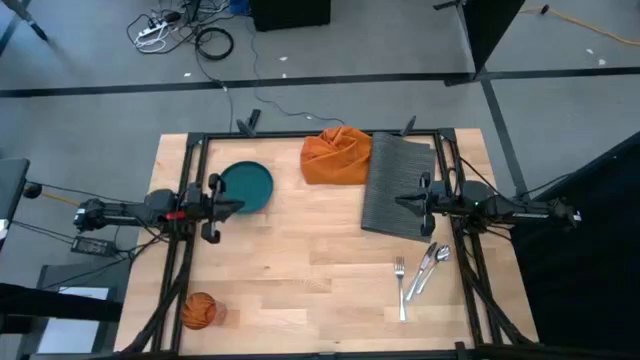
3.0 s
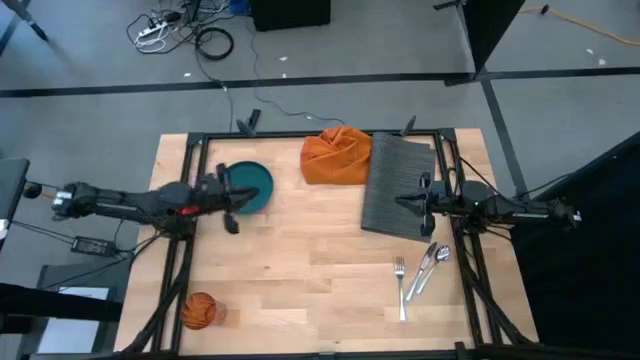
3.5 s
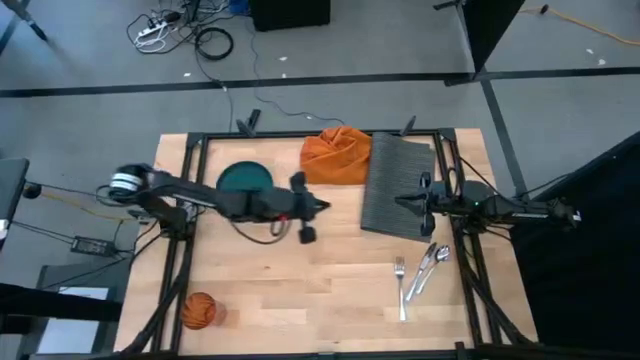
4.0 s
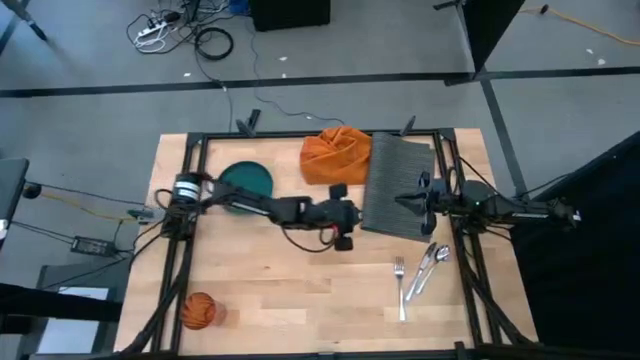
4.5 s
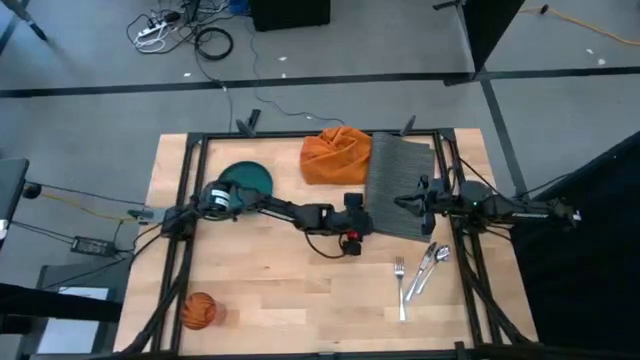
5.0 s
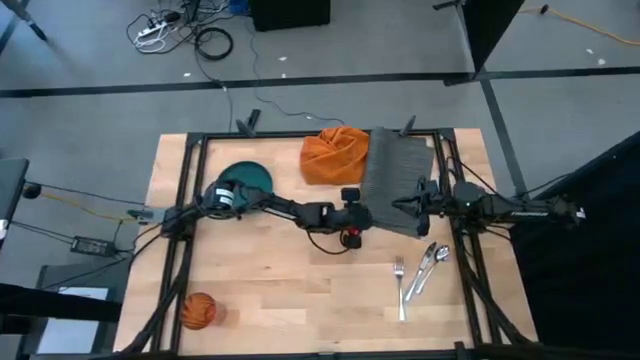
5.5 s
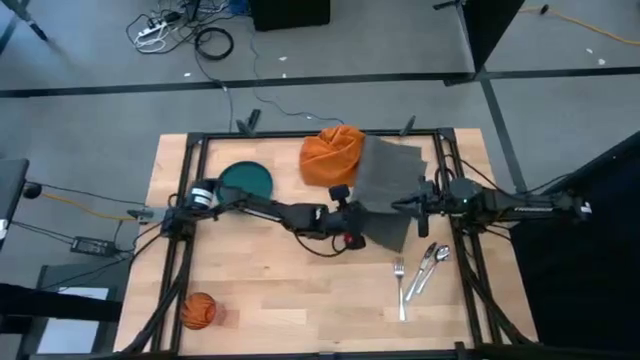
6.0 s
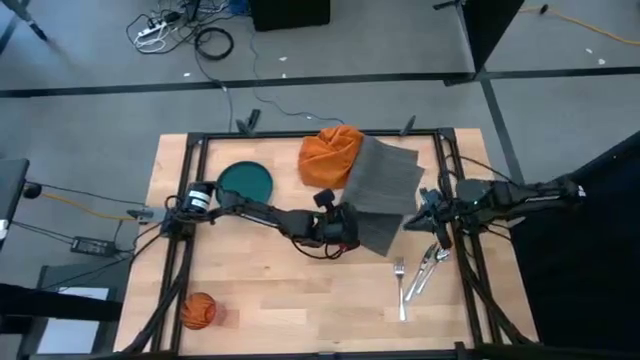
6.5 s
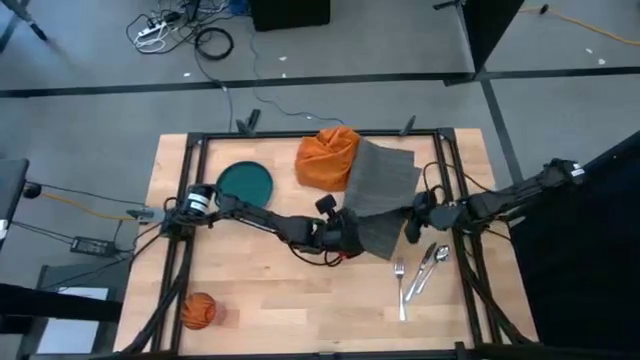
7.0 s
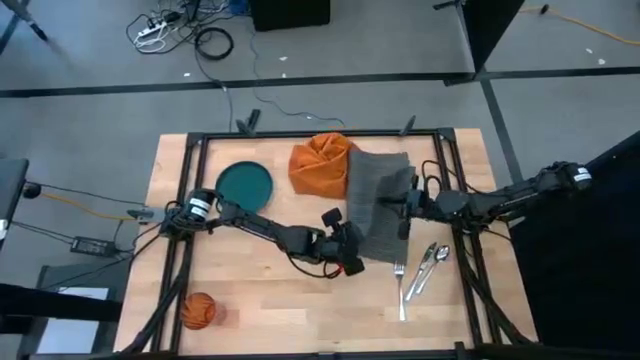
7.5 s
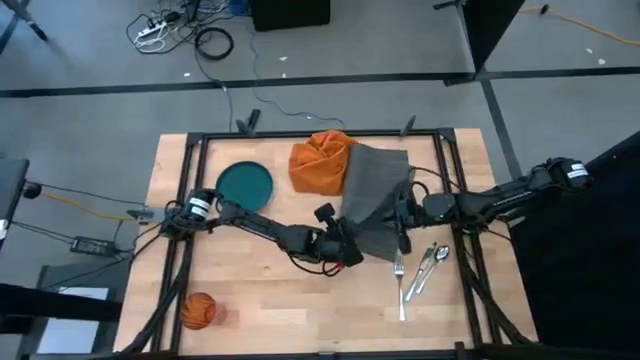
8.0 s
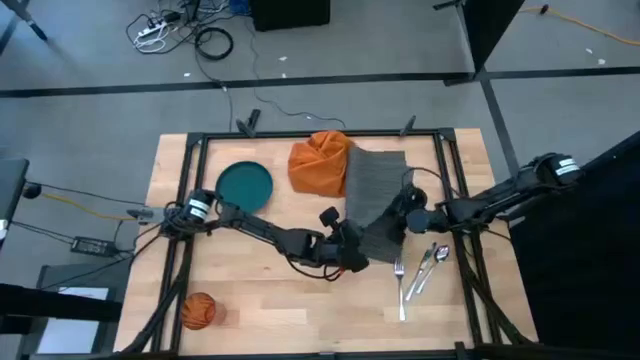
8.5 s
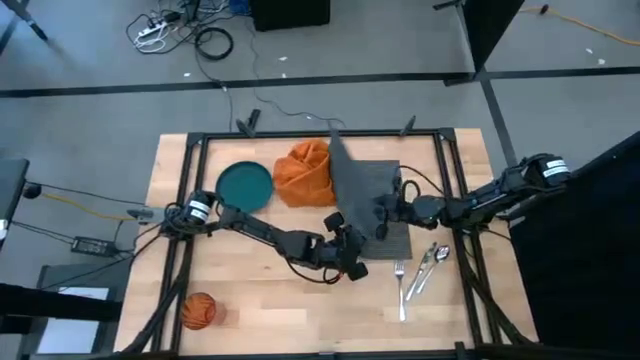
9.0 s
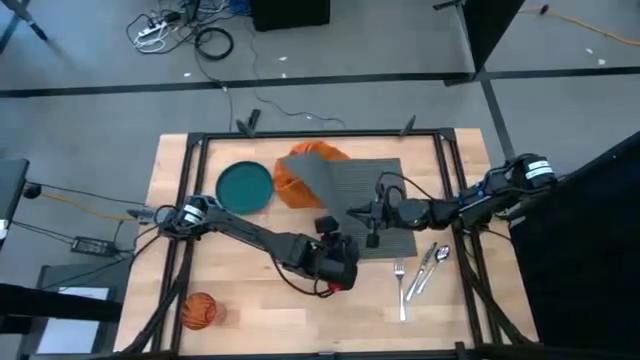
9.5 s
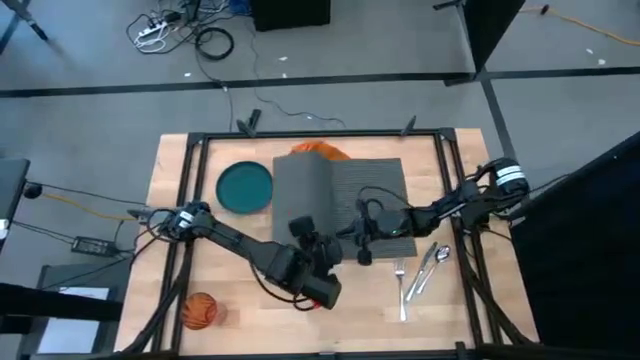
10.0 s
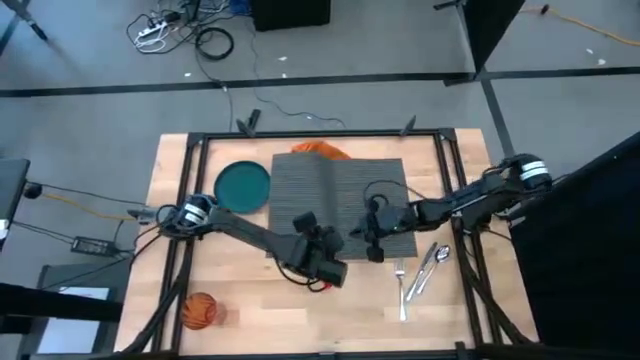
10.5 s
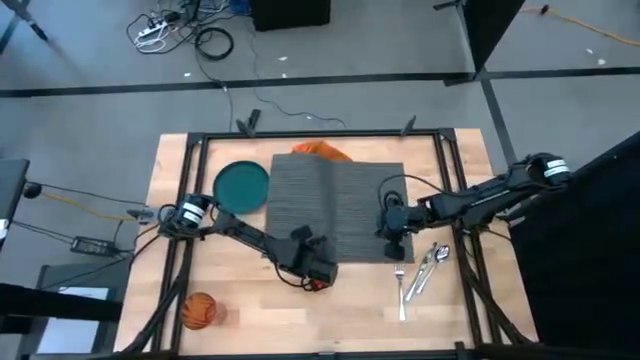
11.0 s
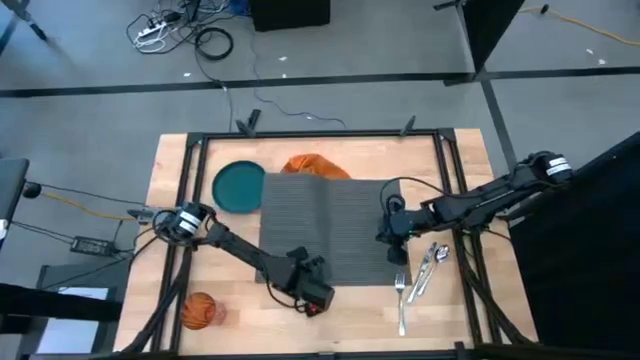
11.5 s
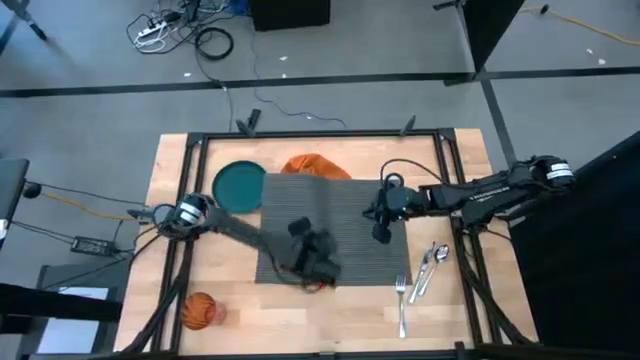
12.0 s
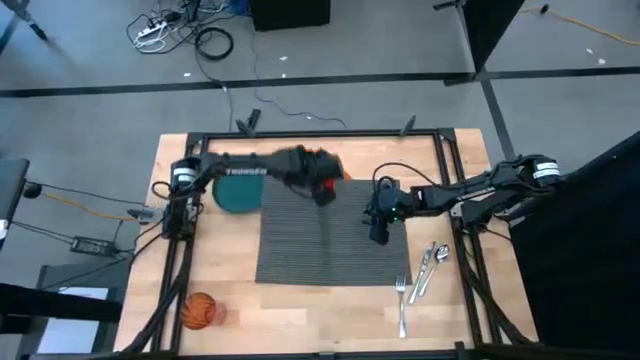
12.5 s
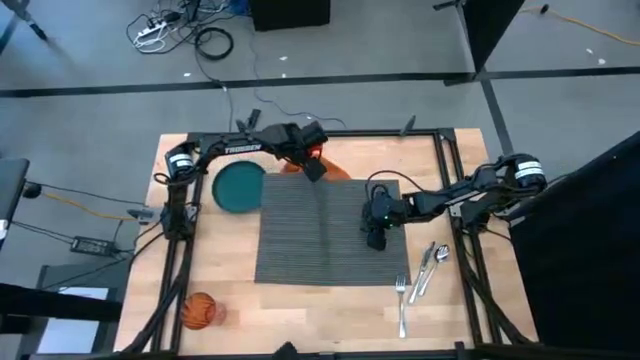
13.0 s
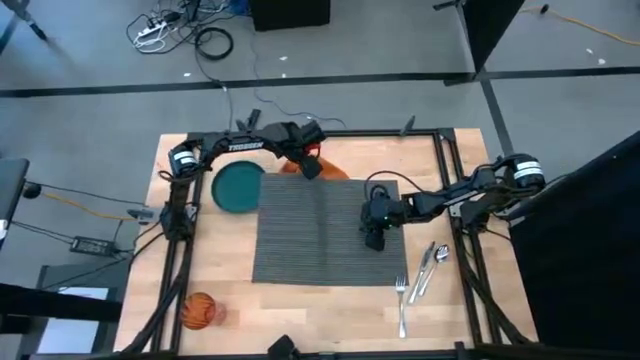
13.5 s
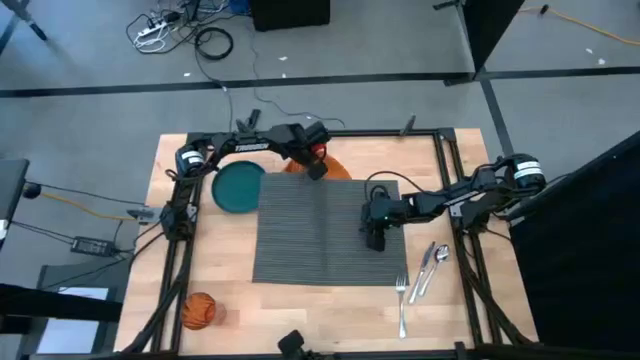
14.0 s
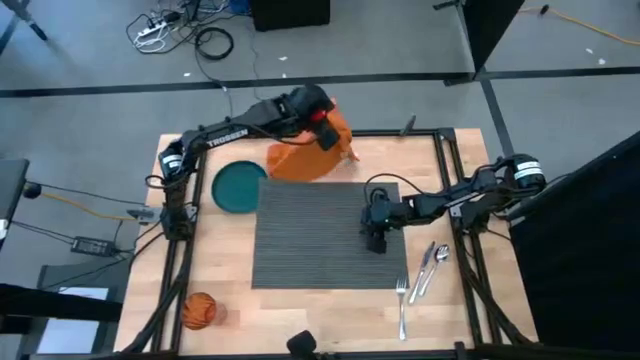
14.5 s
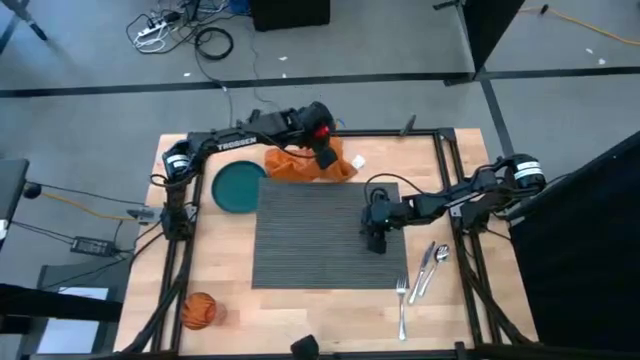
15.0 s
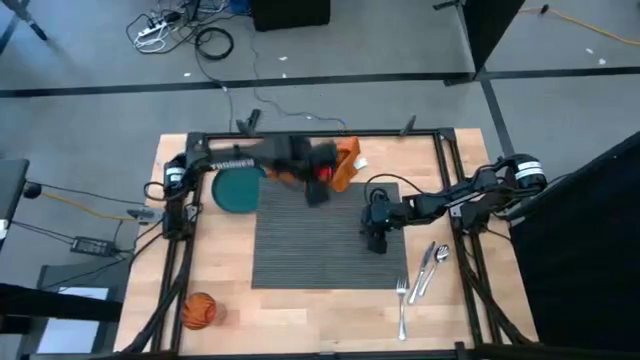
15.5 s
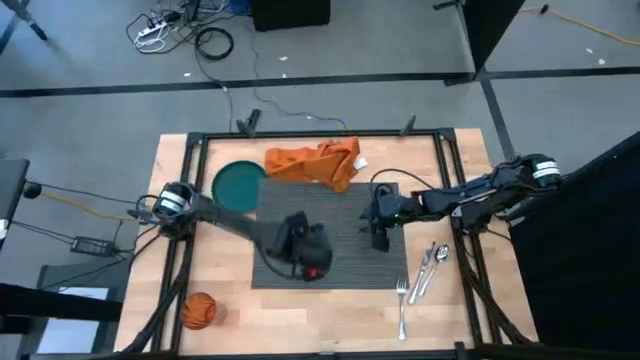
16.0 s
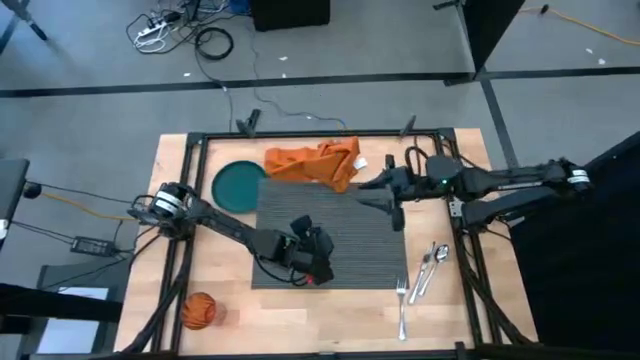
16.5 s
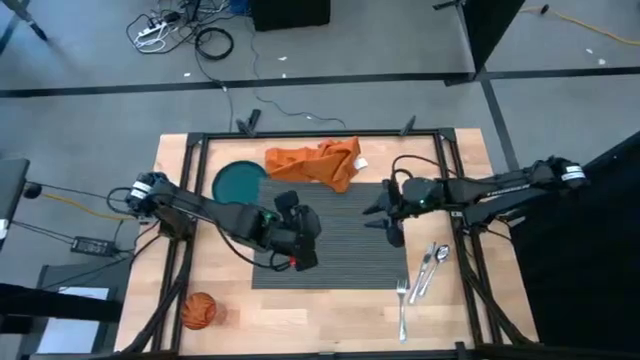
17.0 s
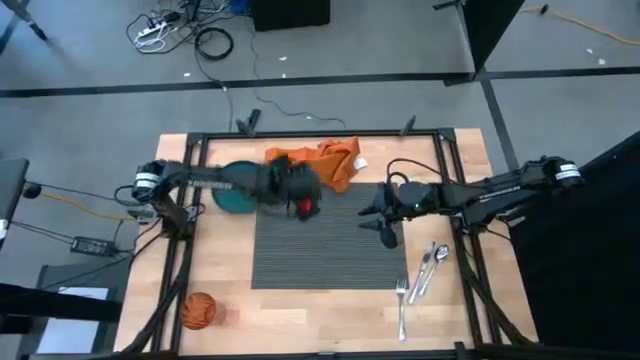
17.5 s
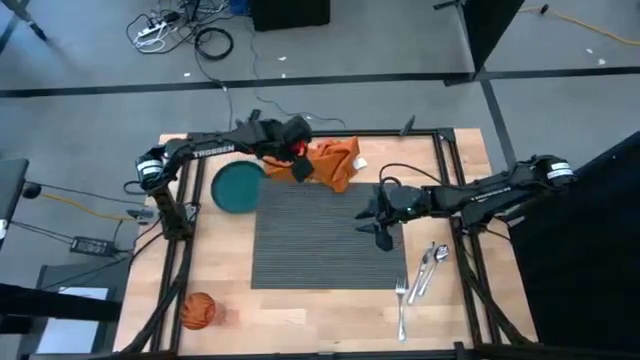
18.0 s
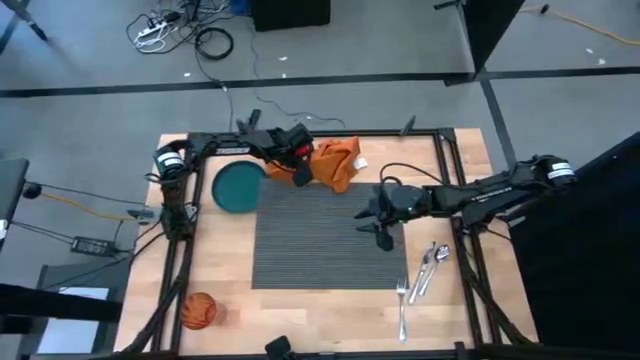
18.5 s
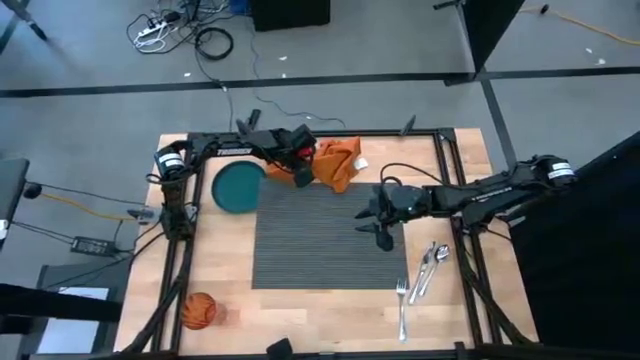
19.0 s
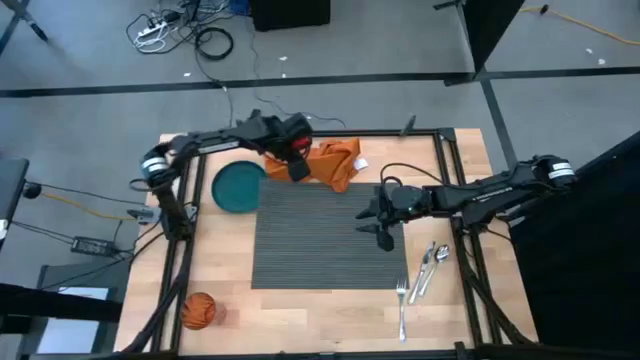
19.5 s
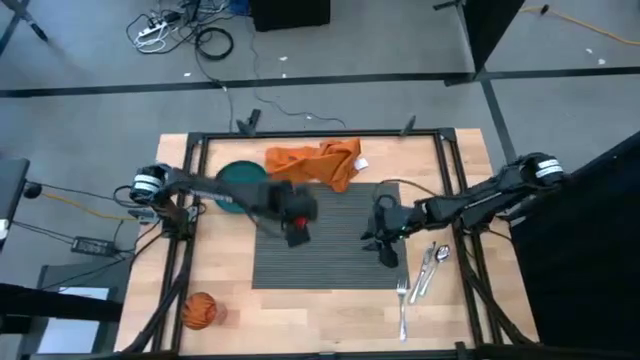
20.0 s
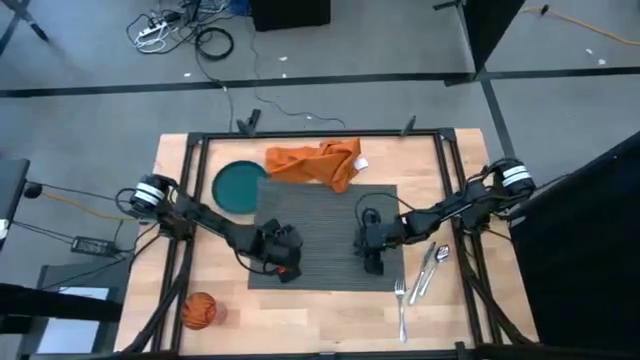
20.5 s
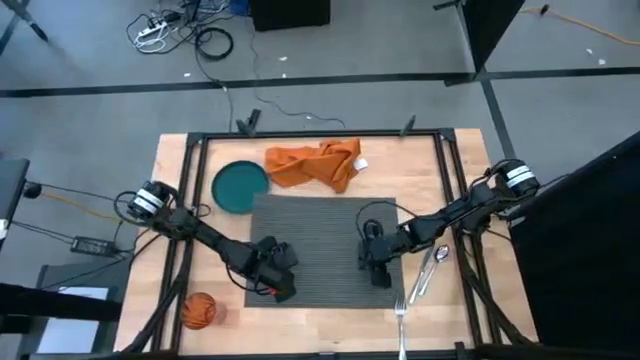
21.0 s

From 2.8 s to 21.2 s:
Task: Set table place
Prepare the gray placemat to the center of the table

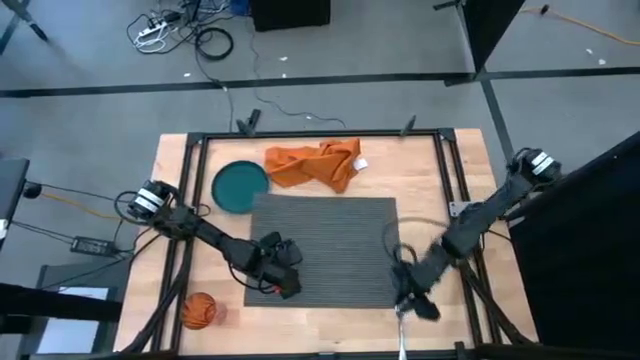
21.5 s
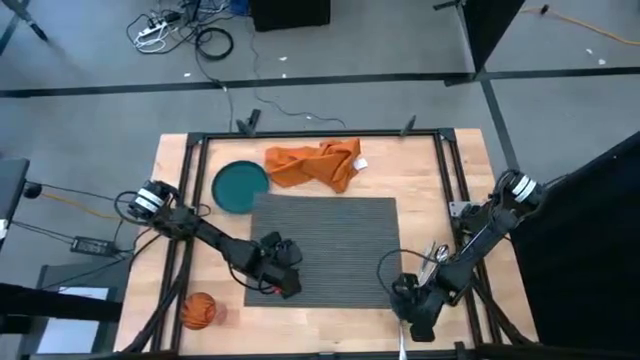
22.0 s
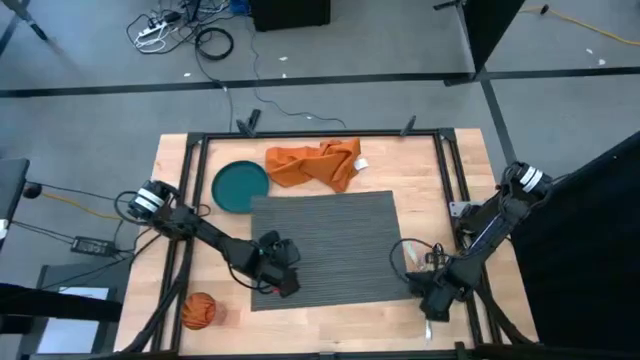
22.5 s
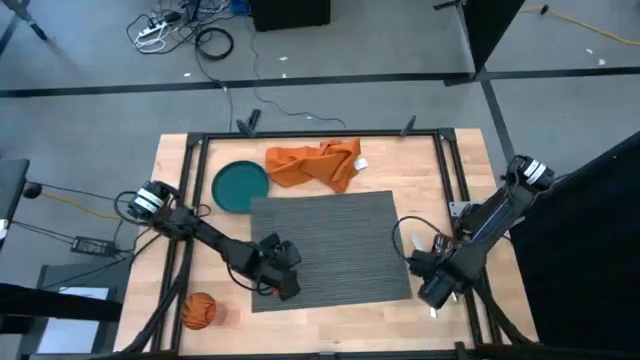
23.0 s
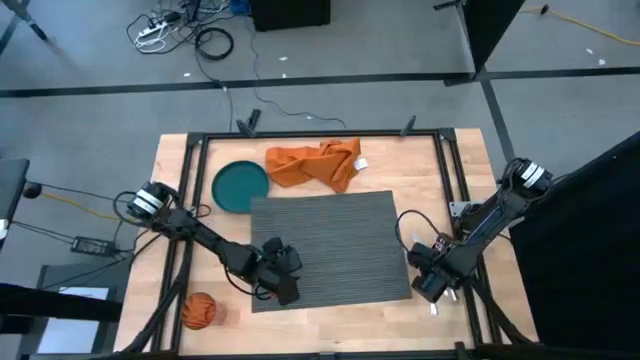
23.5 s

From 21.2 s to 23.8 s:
Adjust the fork

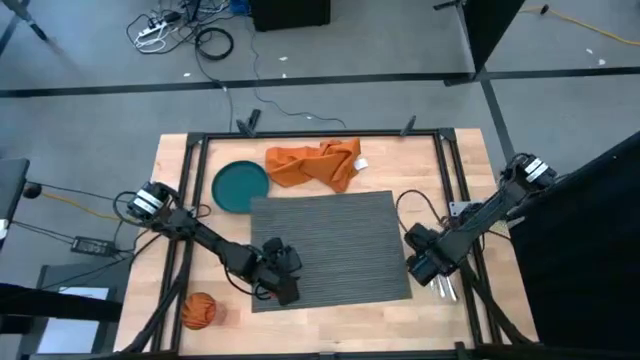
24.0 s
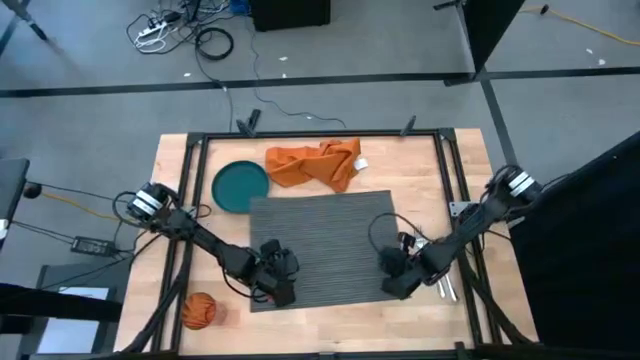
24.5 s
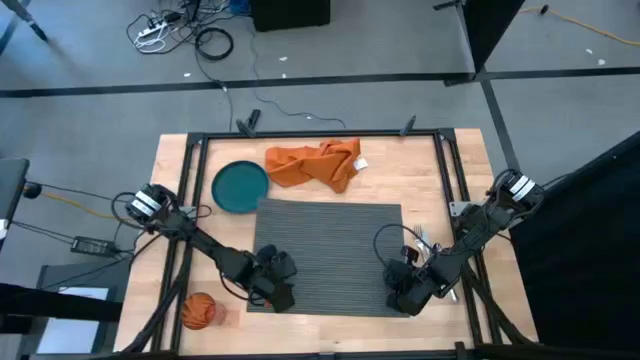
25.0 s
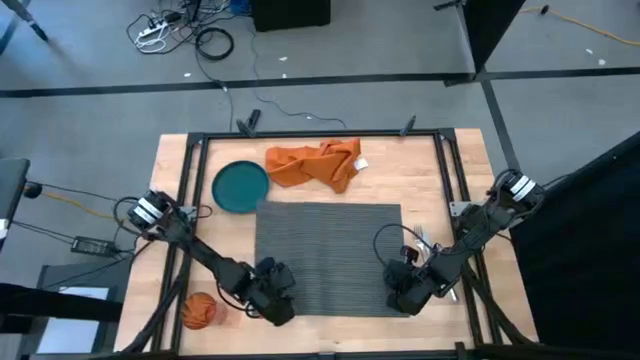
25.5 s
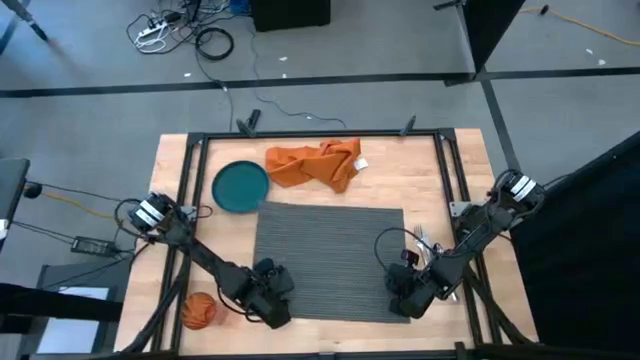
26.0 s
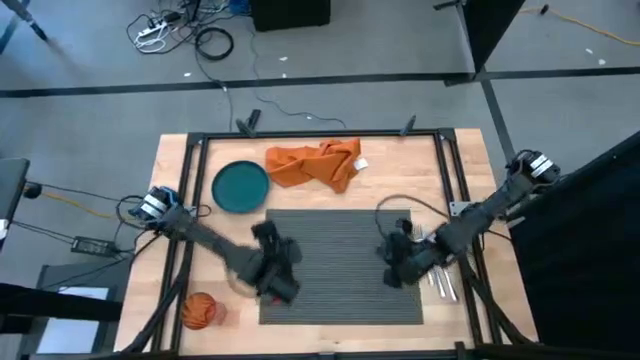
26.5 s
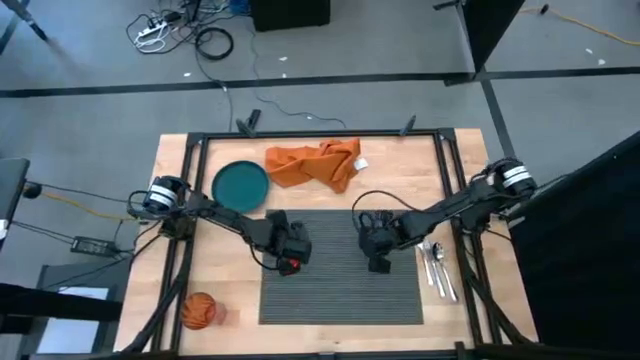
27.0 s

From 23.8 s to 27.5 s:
Adjust the gray placemat
